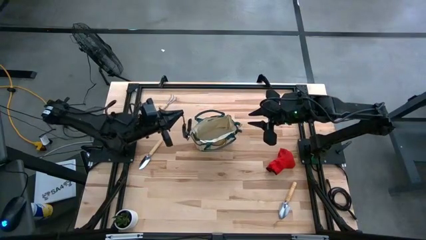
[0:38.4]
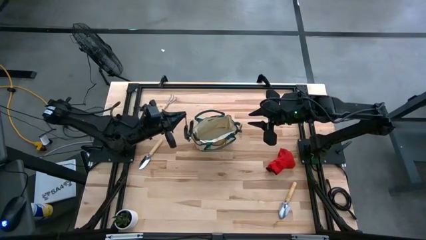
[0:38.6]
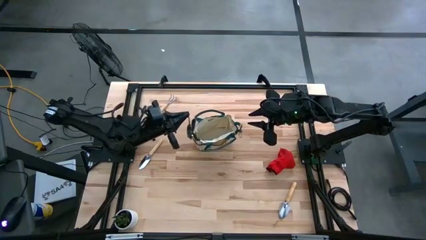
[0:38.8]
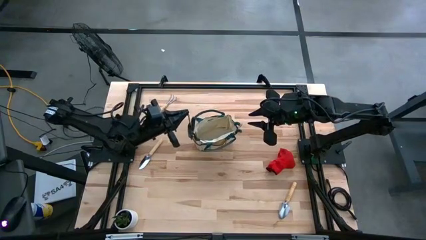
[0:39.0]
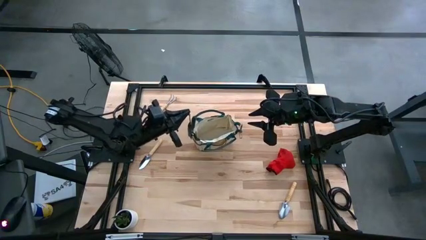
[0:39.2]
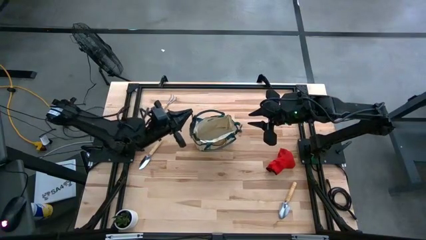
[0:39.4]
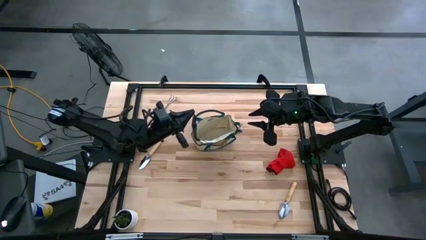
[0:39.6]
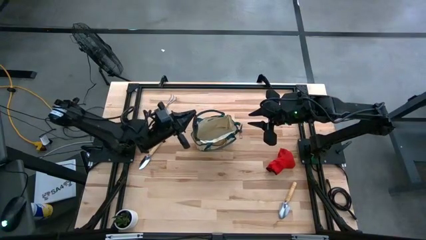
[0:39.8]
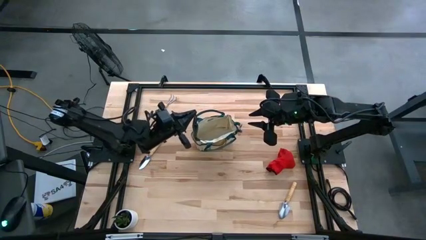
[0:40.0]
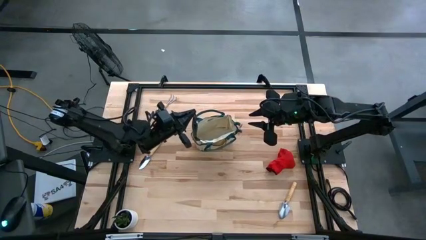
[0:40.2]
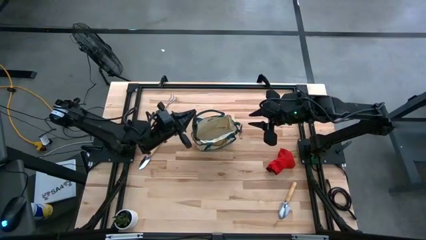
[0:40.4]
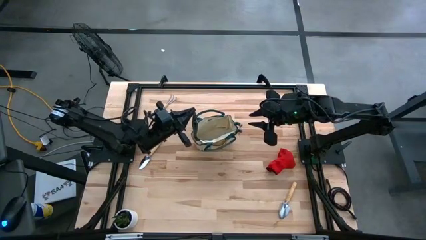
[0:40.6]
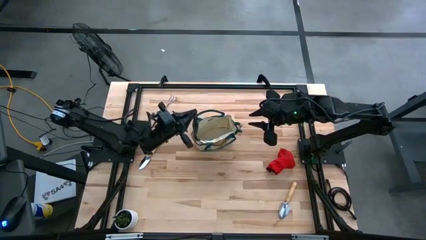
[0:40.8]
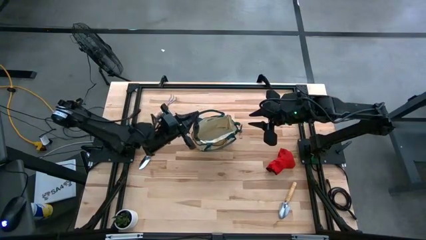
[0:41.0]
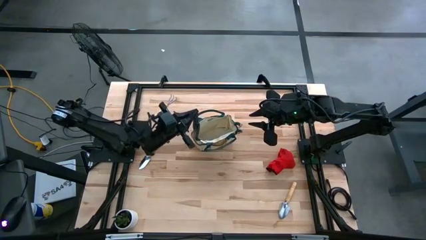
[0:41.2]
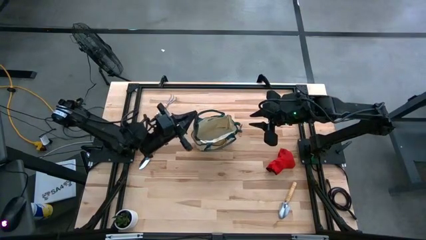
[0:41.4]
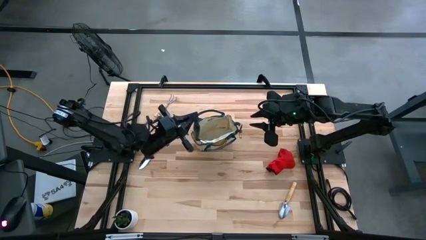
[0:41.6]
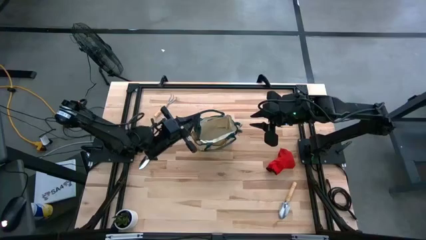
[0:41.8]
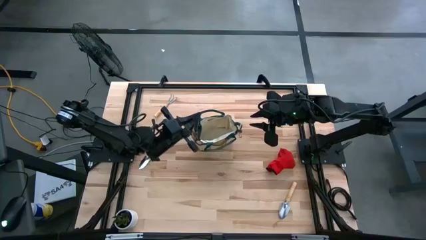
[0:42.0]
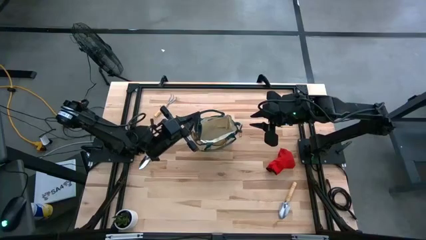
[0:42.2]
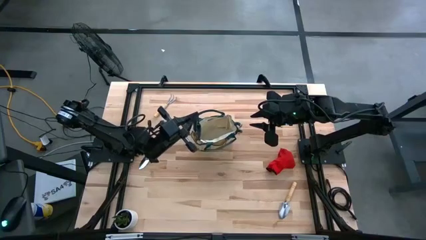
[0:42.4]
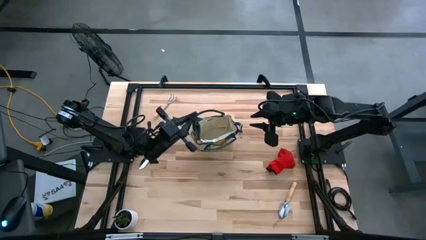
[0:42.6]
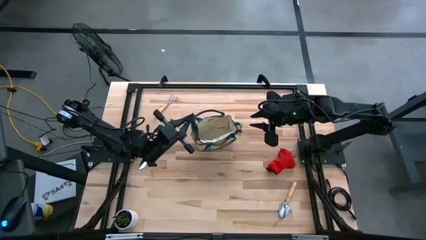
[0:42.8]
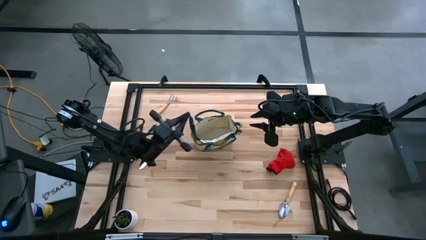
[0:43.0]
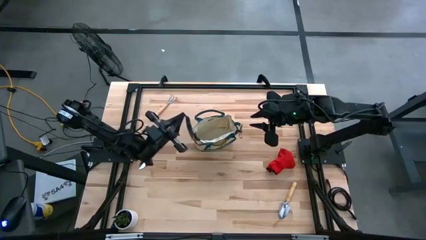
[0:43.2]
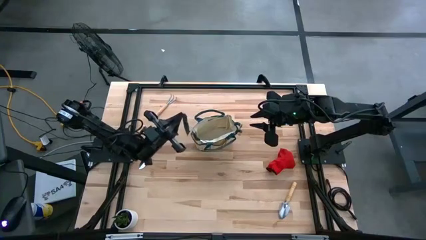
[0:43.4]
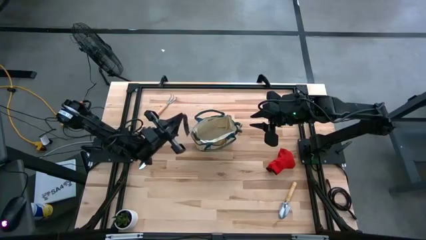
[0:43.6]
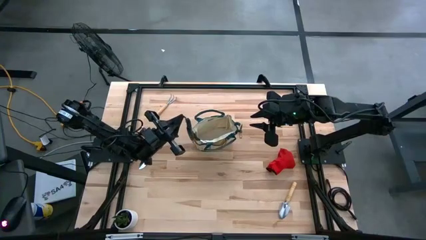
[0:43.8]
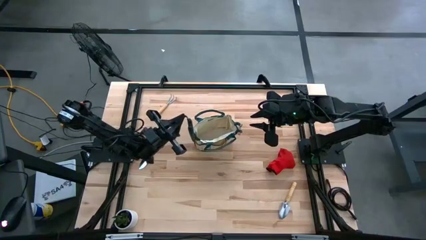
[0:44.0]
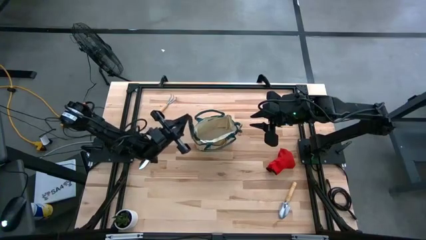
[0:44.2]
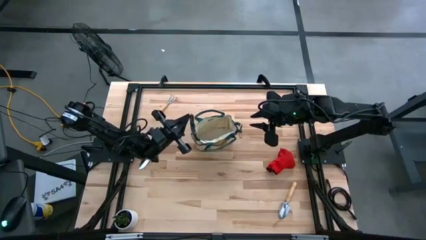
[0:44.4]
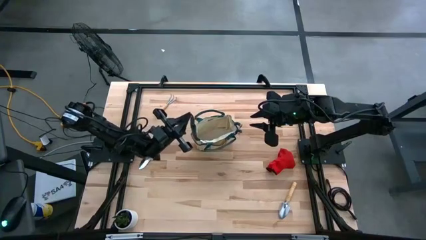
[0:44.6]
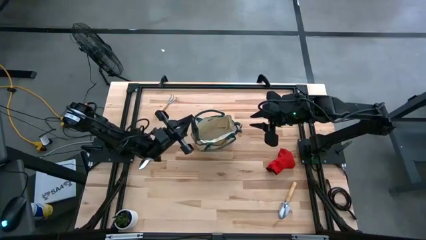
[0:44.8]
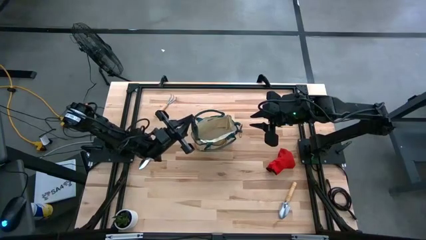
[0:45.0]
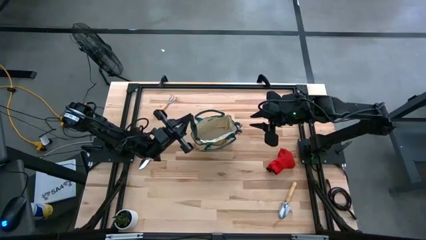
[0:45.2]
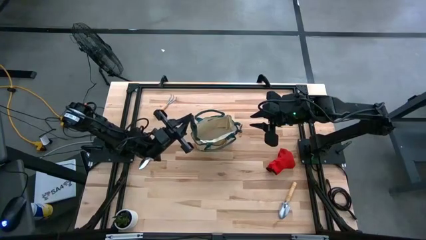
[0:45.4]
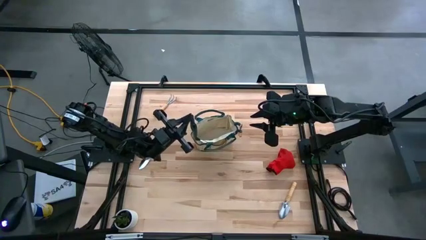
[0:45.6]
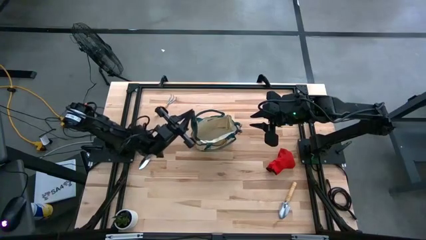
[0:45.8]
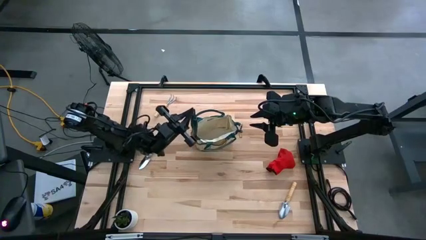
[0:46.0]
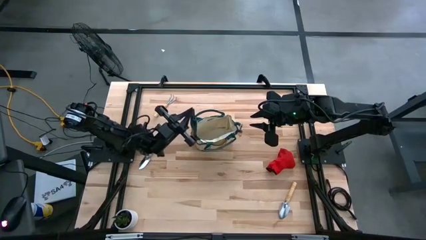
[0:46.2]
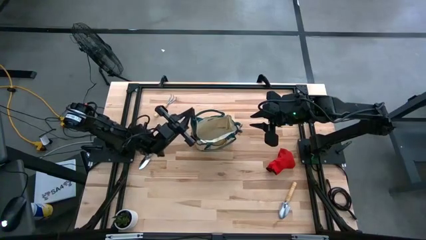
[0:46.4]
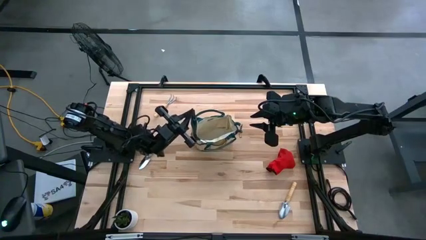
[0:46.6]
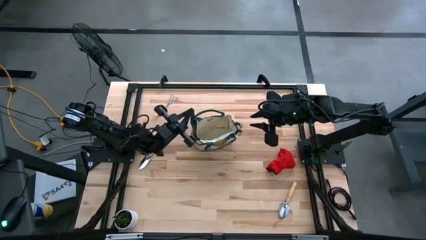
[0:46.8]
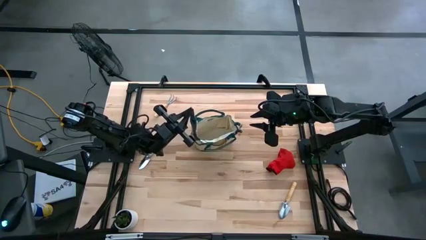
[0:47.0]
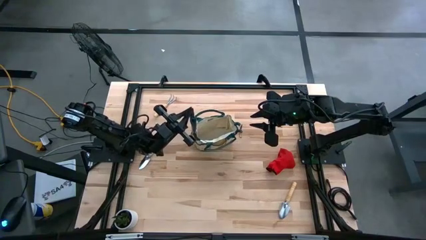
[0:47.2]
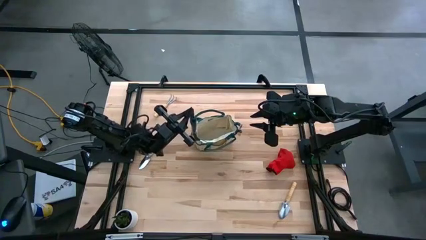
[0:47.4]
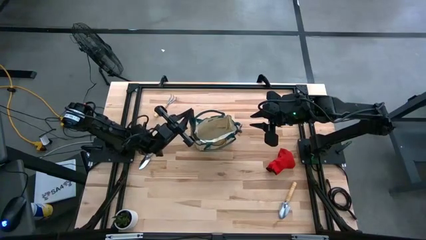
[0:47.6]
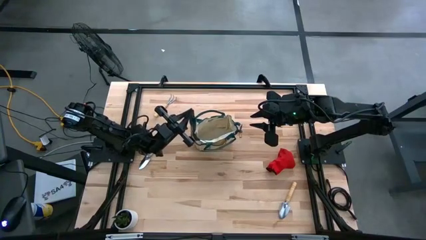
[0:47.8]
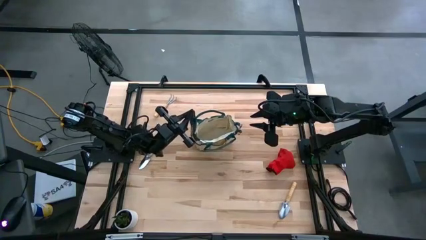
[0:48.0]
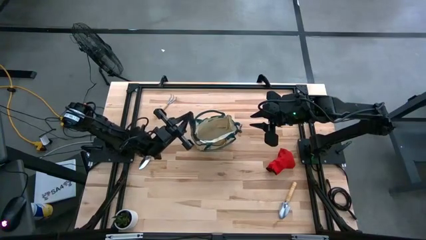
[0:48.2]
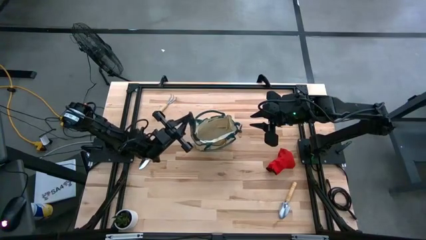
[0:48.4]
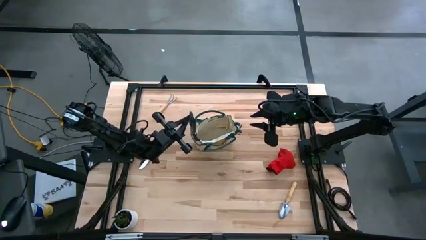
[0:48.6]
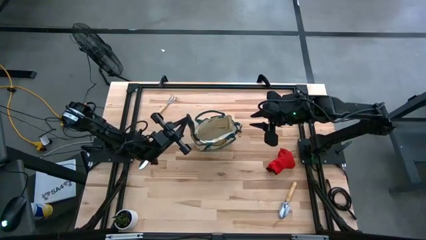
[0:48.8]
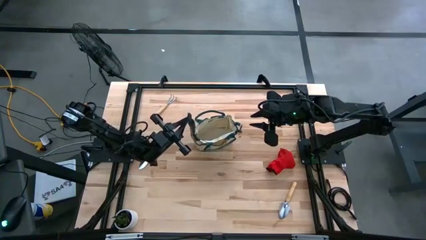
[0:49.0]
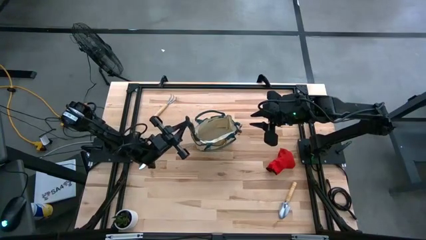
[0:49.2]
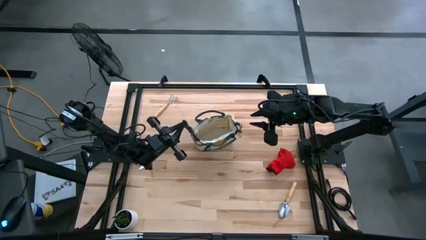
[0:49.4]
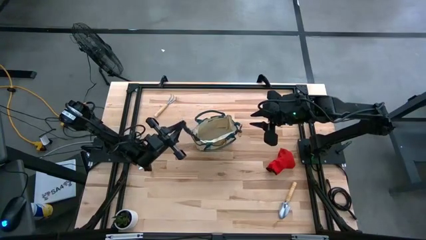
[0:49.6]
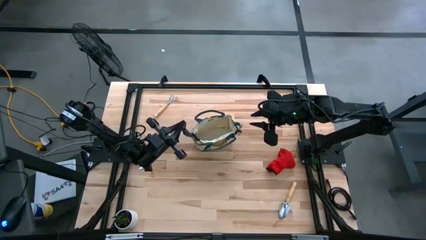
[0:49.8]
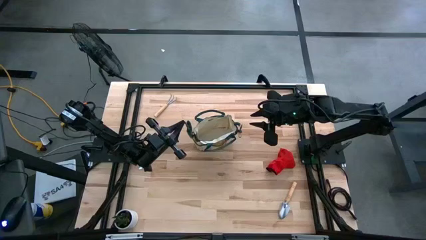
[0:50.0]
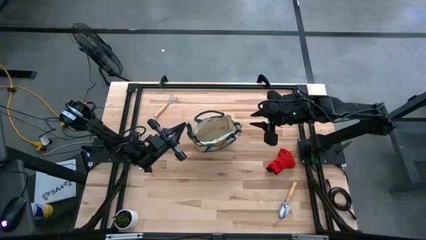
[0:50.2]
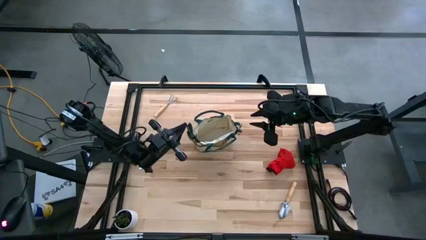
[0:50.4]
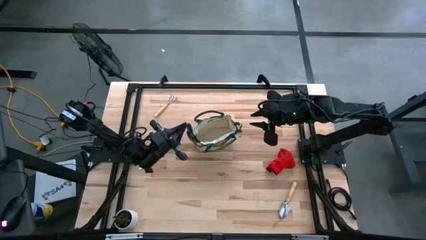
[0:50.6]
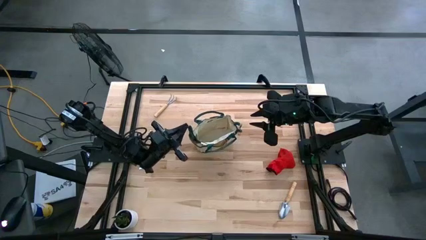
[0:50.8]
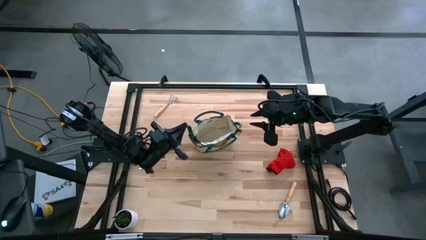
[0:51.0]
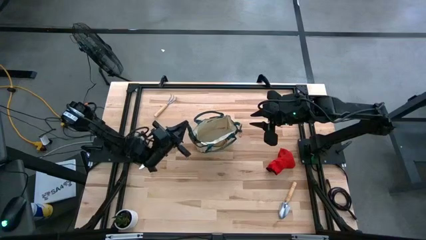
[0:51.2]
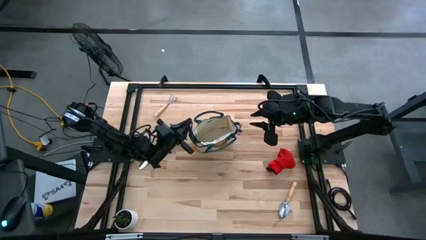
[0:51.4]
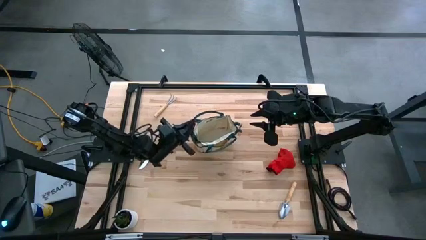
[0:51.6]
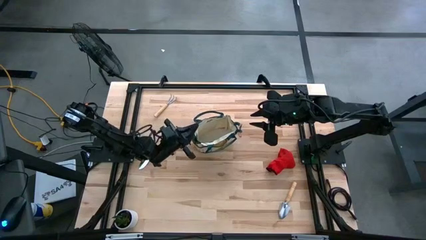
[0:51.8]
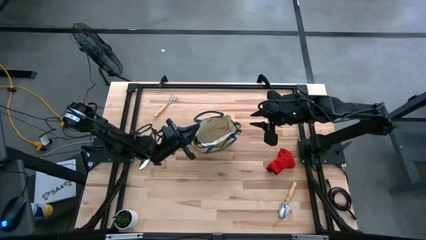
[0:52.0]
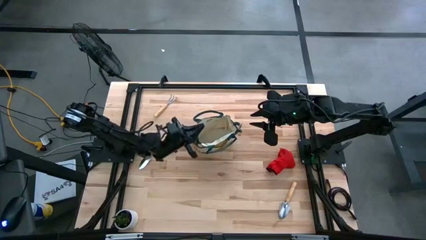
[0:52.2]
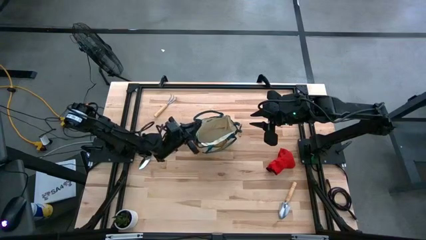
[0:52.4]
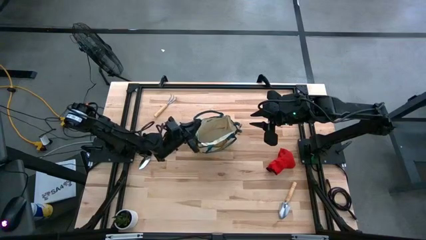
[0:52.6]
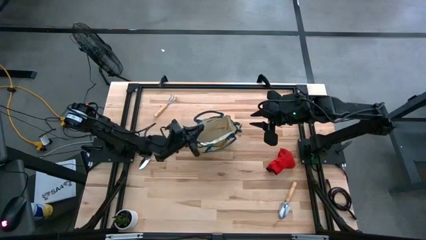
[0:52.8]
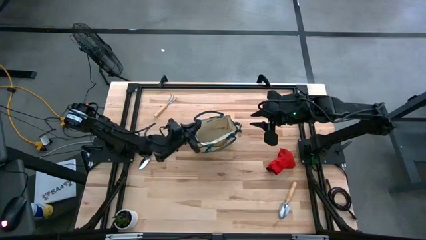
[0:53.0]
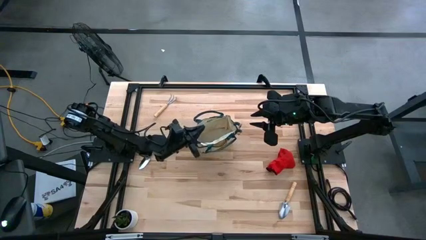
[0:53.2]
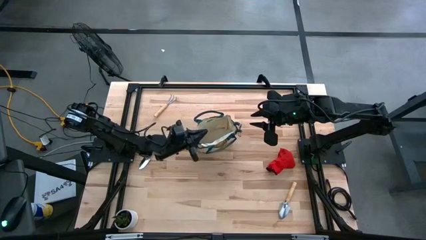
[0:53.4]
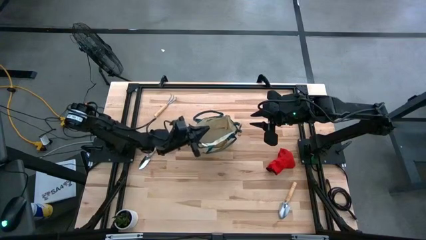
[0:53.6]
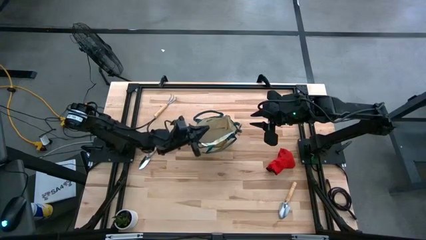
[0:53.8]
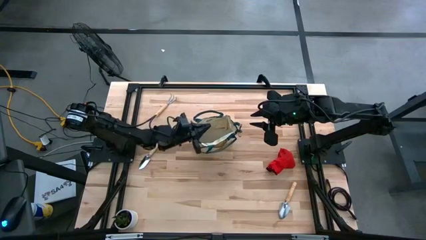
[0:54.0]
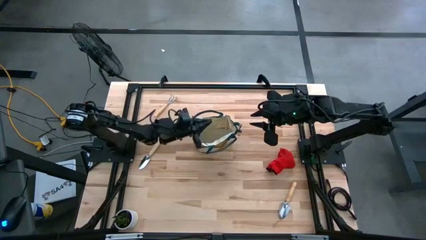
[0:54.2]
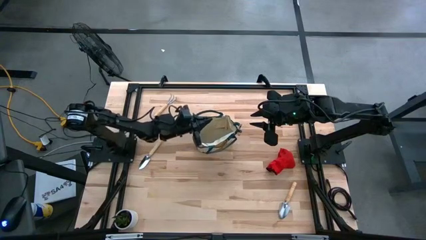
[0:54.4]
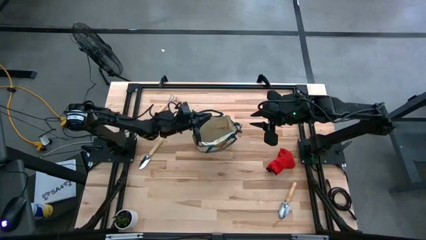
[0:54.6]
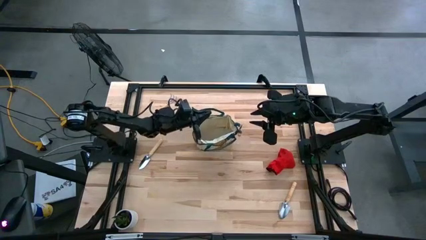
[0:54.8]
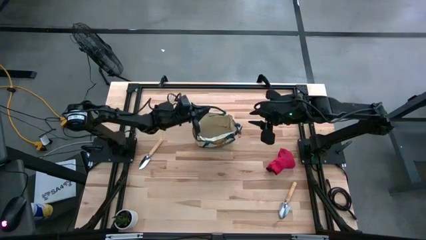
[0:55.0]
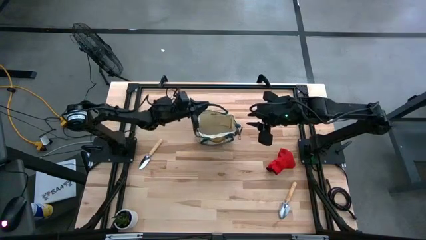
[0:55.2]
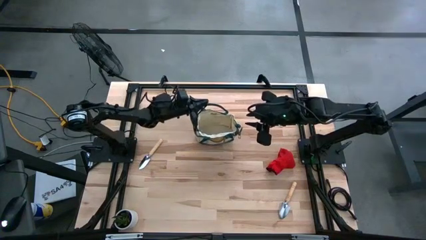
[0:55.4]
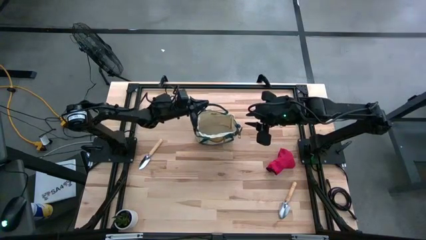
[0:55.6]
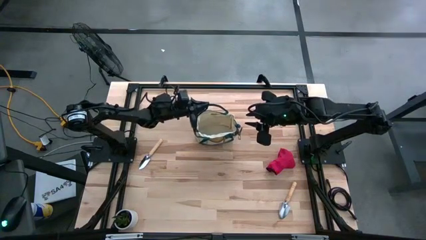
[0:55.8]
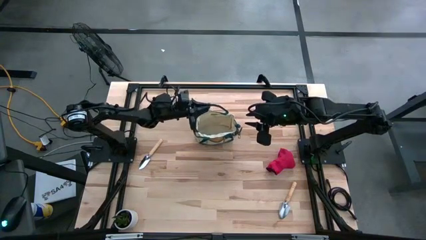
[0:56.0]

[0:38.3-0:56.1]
Task: Pick & Place Garden tools in Gardening bag
Put the shear scissors into the gardening bag
